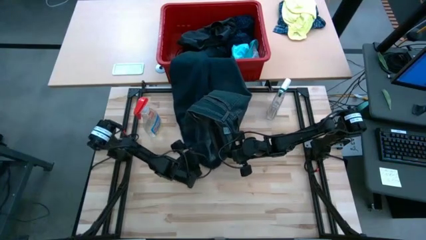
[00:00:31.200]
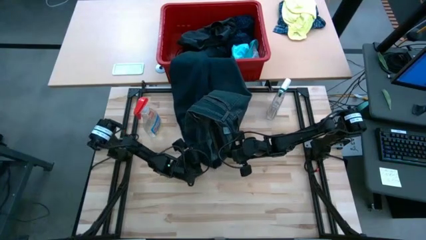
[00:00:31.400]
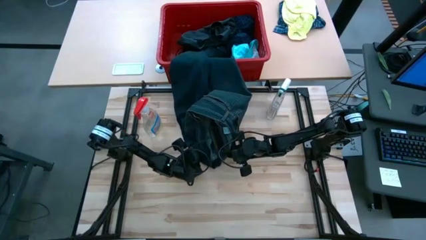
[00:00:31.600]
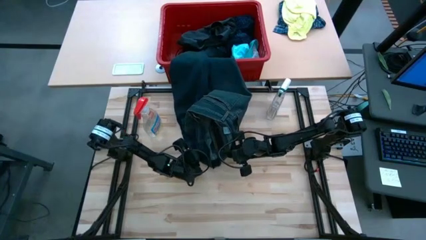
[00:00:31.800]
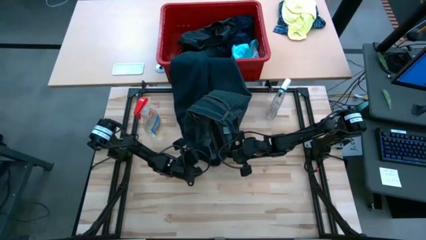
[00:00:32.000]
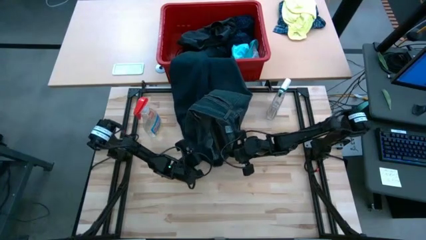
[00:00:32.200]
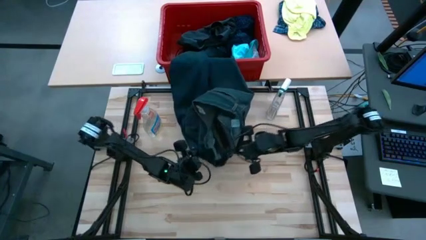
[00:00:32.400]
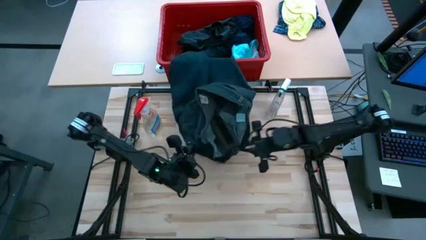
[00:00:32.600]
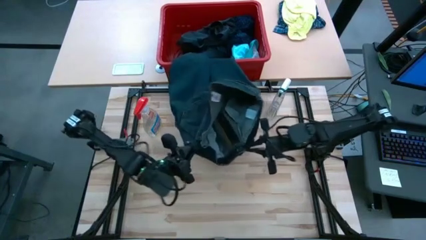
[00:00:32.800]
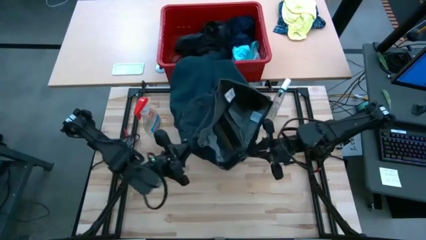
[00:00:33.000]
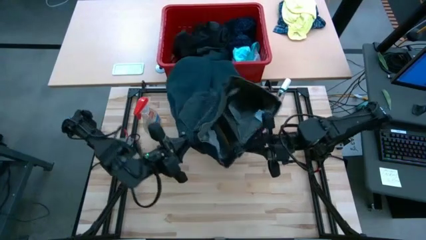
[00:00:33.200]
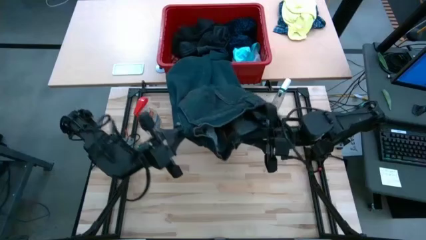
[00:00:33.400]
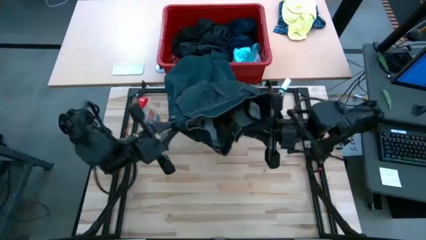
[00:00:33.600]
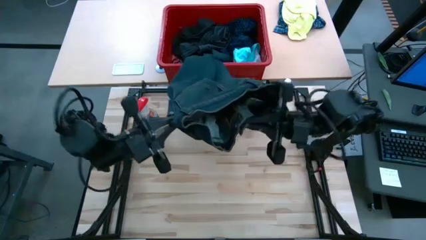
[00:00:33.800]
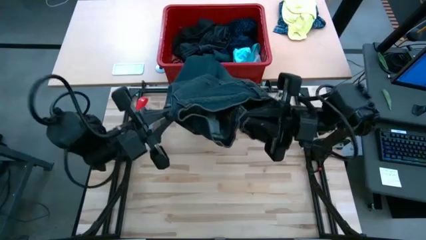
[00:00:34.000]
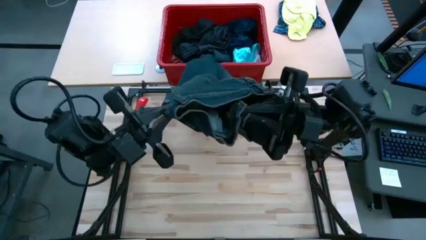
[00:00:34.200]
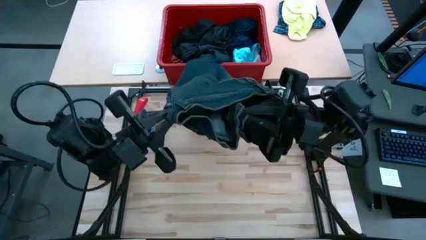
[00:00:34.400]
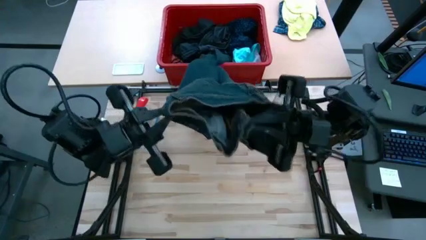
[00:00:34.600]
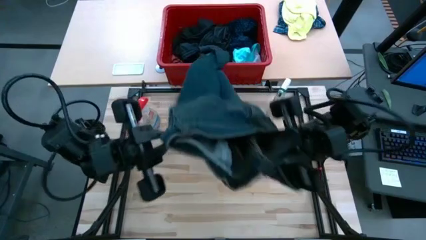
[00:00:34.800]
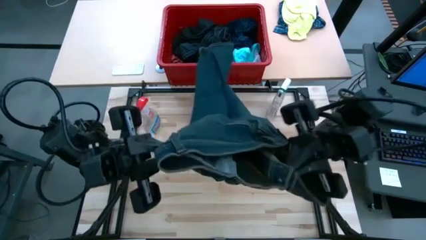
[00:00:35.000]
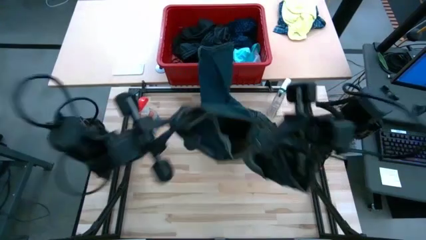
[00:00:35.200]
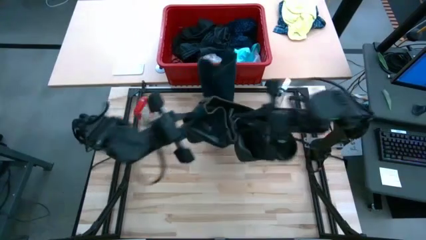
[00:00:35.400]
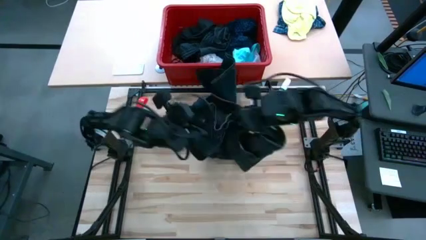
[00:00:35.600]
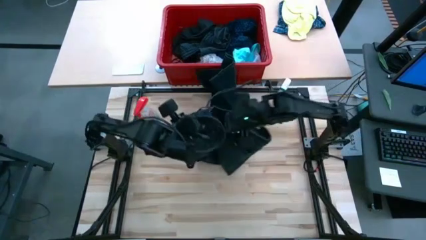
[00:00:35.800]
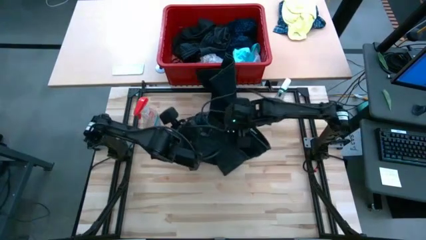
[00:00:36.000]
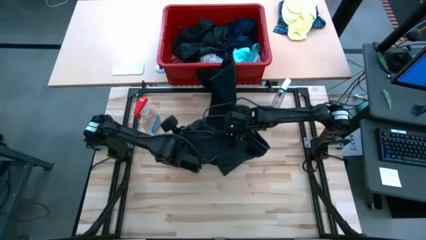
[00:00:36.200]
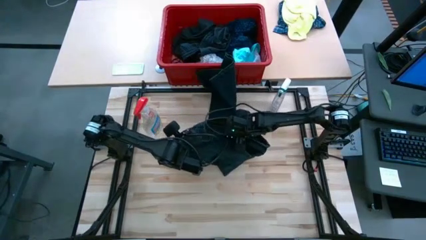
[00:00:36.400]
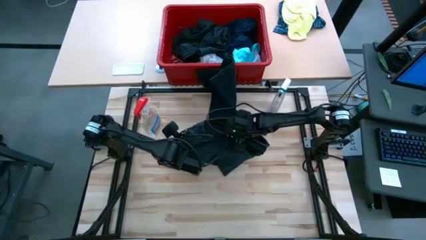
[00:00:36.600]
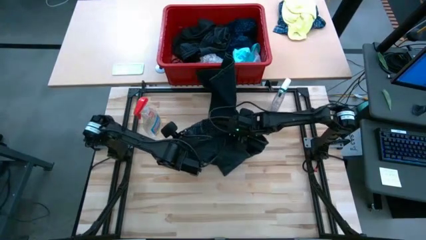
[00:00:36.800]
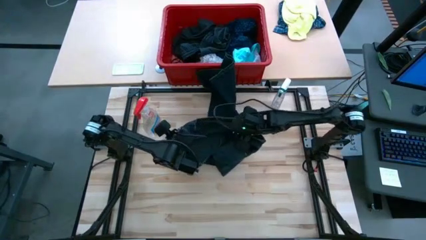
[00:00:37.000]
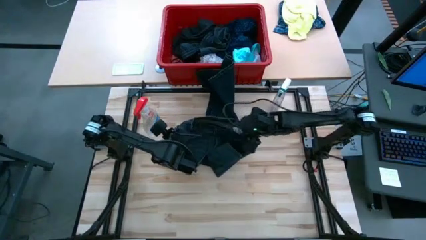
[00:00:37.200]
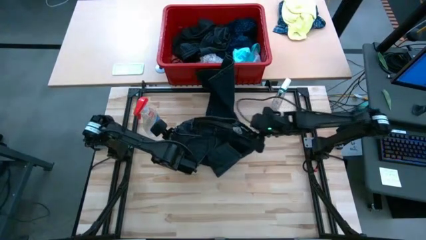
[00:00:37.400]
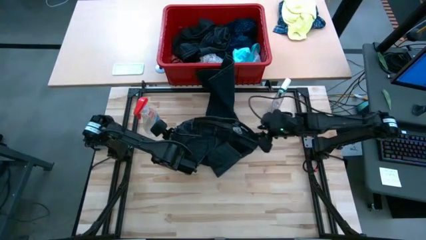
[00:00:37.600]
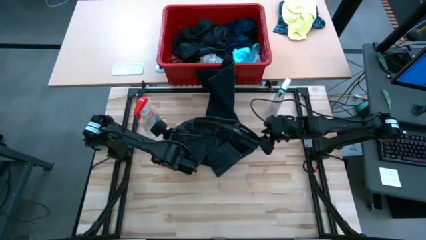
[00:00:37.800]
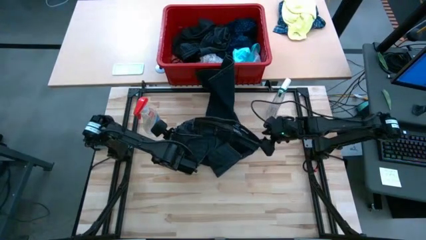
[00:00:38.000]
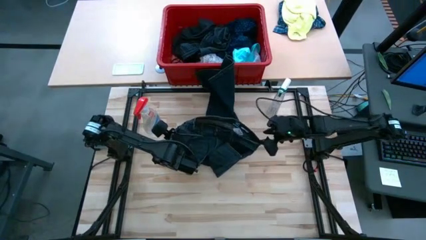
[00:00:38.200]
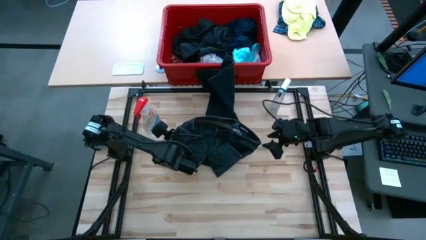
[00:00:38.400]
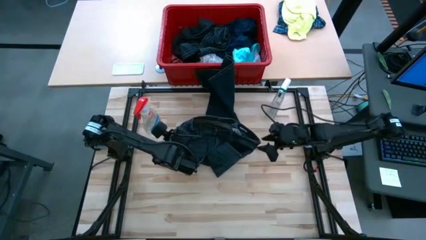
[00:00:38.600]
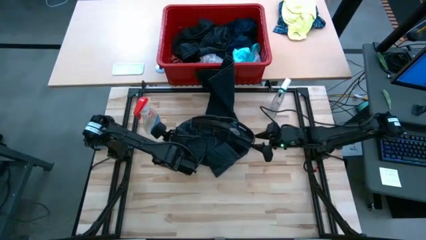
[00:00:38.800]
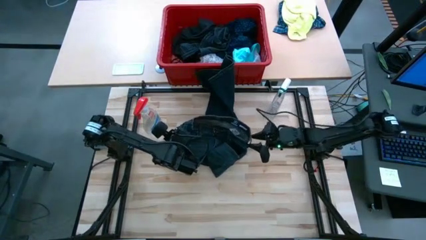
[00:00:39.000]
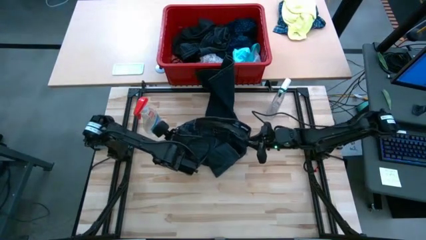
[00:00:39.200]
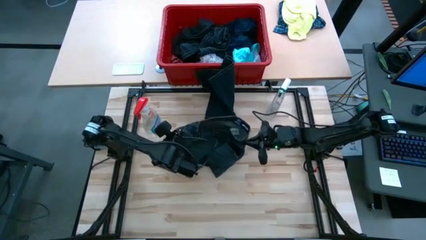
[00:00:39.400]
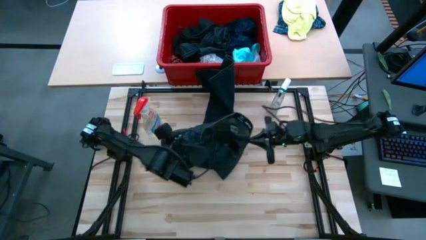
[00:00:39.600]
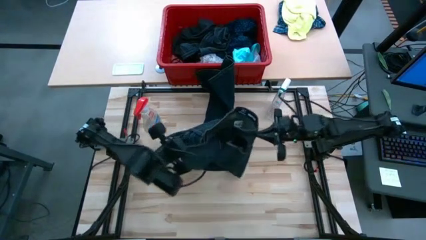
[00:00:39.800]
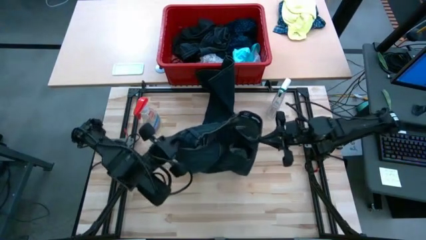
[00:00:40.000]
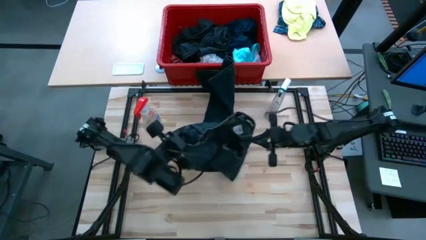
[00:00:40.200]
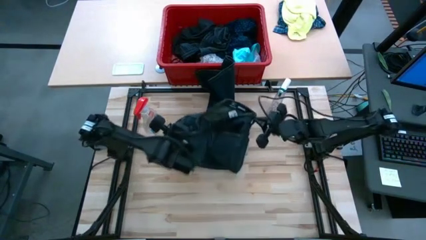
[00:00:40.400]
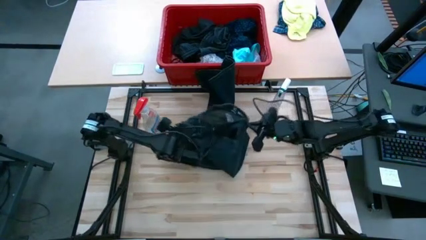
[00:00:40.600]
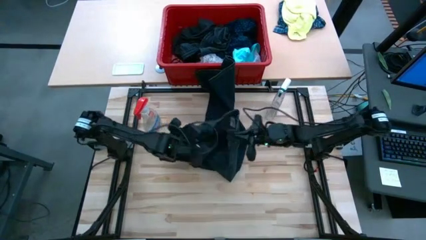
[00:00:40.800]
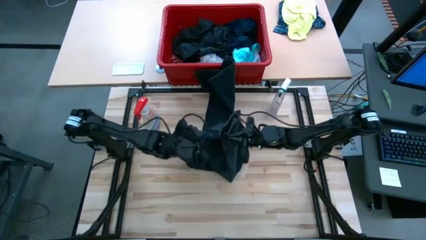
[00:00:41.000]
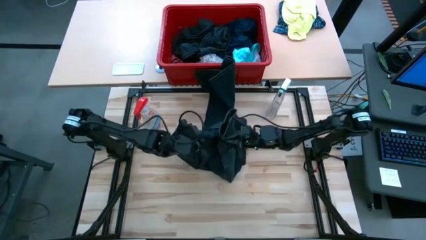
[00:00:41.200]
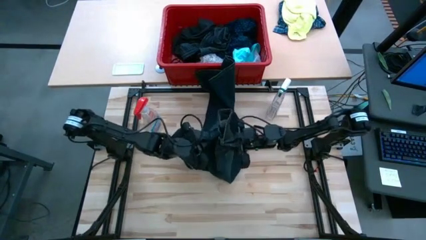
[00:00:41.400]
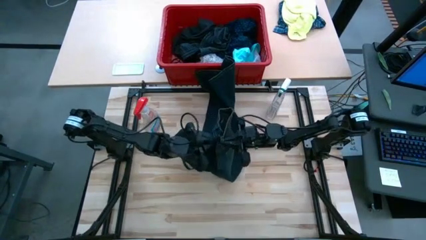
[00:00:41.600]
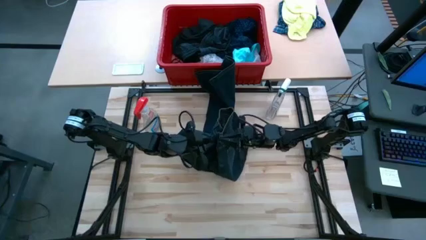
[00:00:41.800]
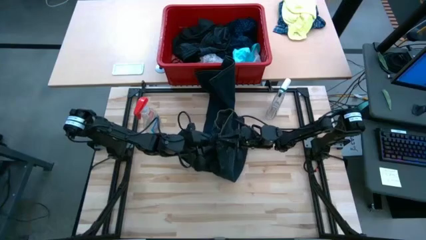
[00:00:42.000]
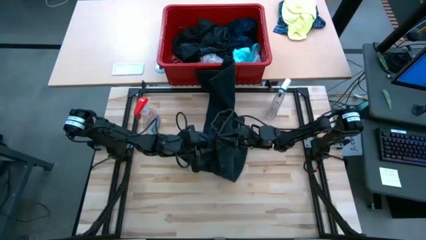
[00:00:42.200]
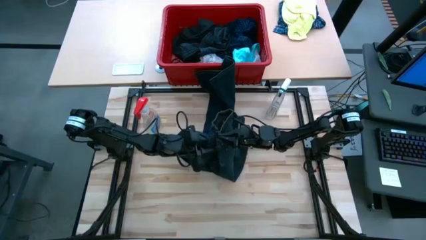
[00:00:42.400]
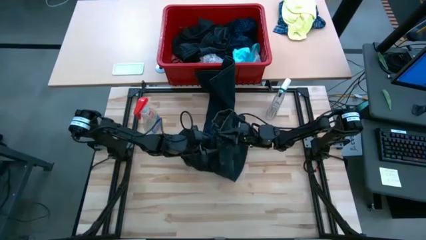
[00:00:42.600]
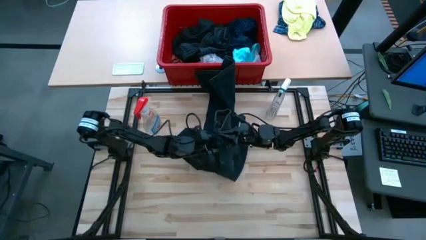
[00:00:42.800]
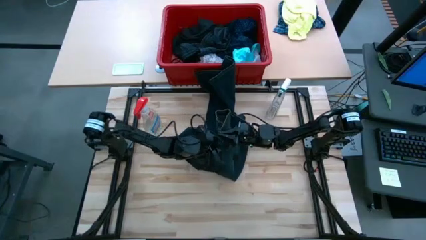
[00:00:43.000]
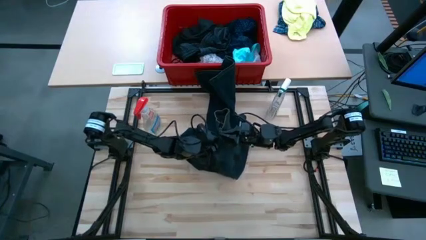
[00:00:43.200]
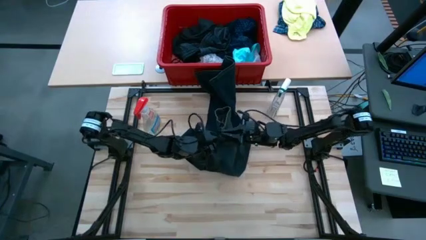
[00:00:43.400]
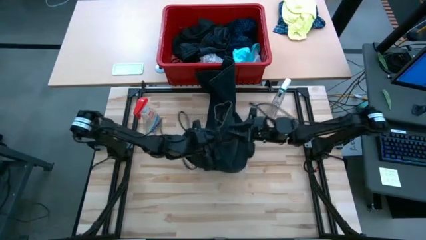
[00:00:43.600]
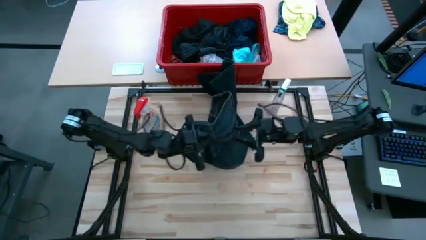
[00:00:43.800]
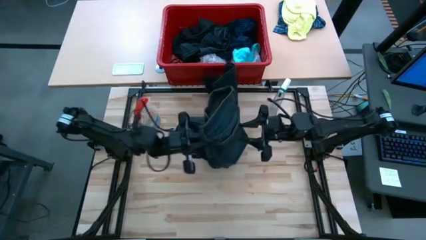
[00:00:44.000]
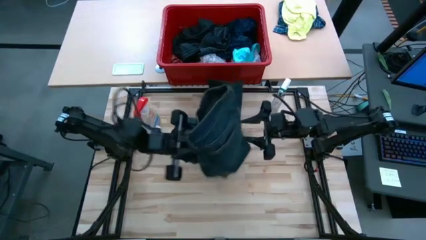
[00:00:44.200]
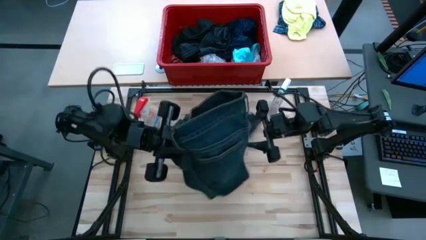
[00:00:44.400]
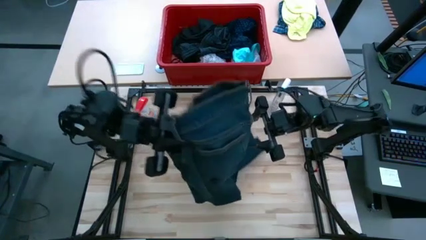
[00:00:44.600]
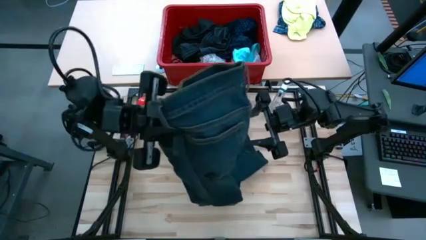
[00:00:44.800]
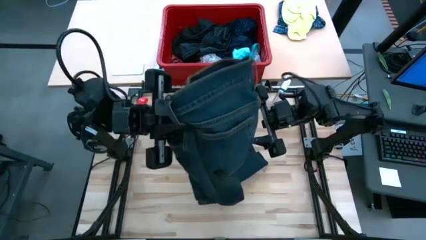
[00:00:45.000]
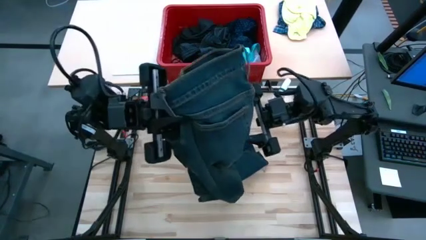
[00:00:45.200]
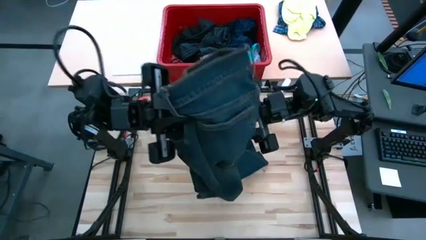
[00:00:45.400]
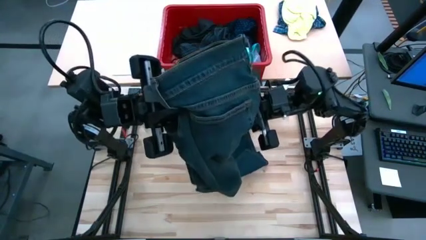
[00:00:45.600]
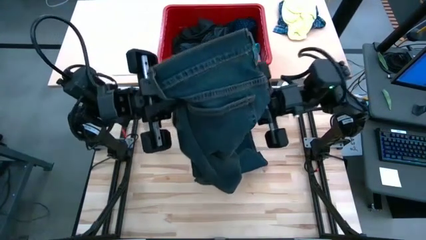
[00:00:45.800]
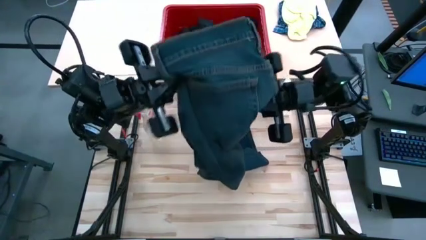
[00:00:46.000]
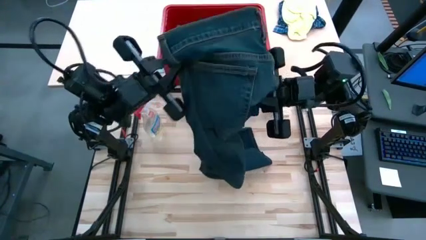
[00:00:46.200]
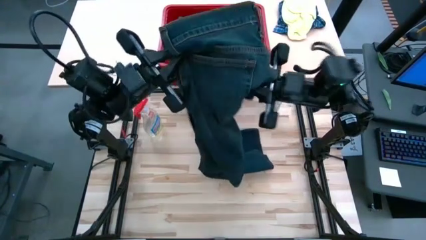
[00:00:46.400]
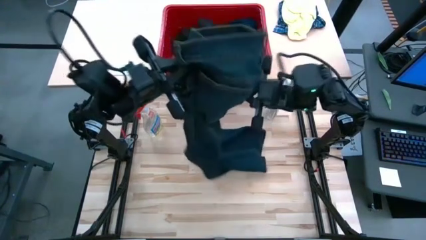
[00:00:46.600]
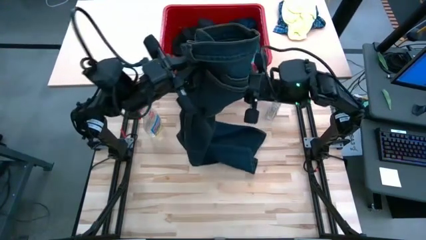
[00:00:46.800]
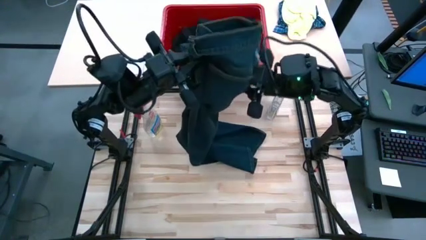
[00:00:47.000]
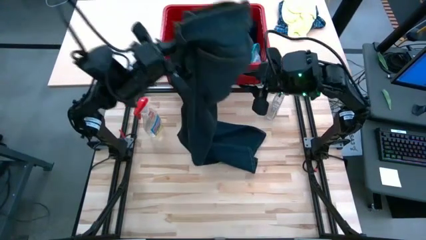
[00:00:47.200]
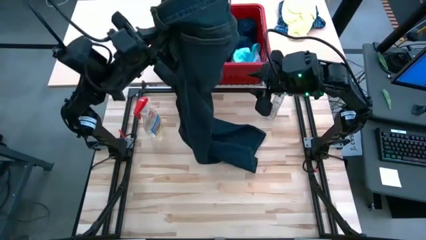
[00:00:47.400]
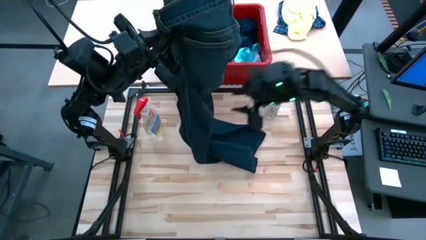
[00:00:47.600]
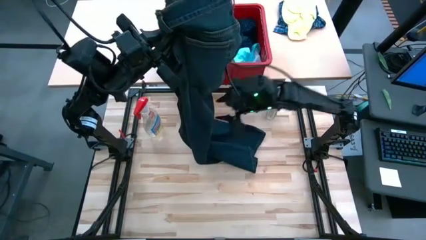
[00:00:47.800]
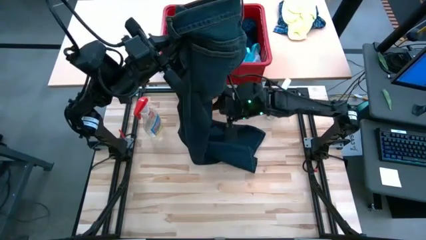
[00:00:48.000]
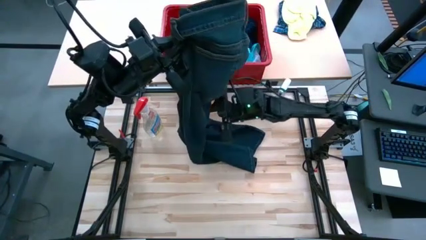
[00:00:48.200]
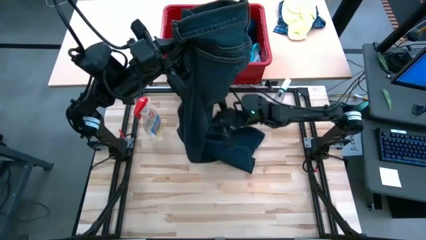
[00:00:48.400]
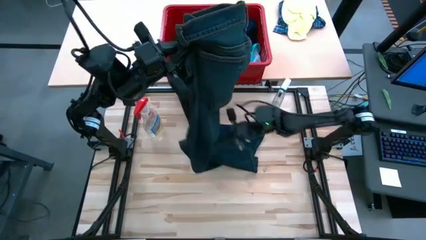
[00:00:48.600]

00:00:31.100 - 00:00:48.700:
Task: Fold Laundry from Bin
Fold the blue pants
